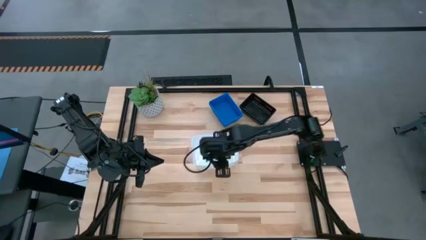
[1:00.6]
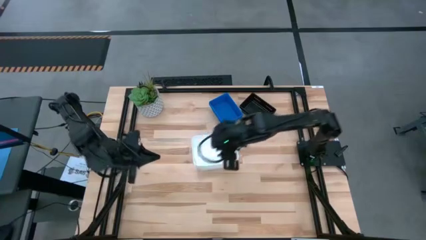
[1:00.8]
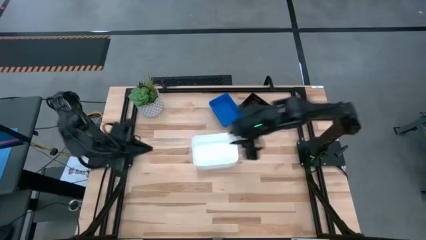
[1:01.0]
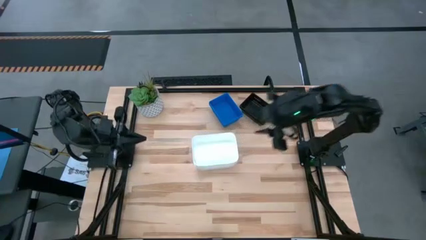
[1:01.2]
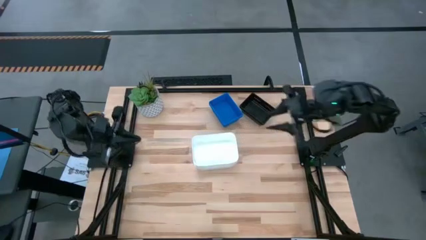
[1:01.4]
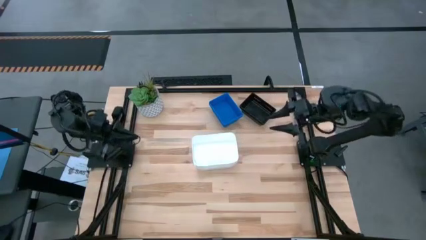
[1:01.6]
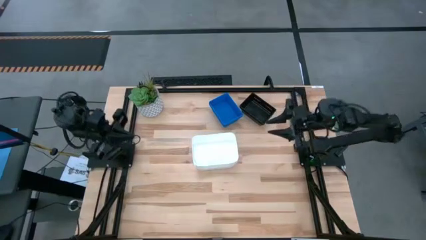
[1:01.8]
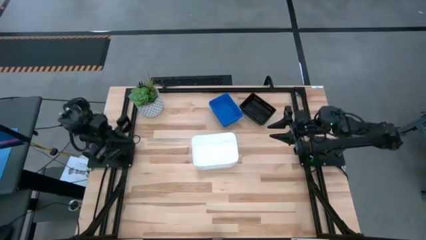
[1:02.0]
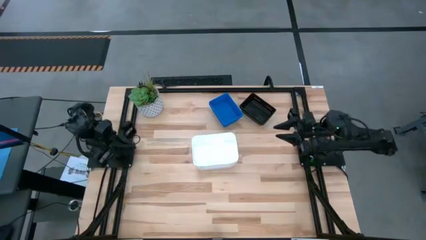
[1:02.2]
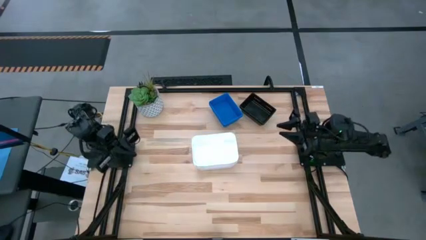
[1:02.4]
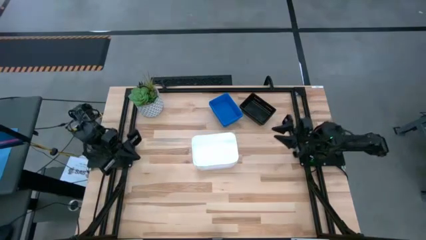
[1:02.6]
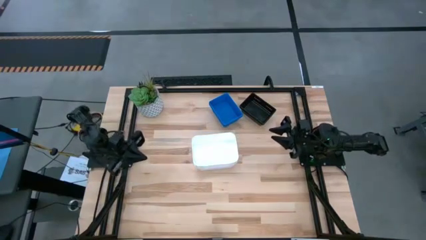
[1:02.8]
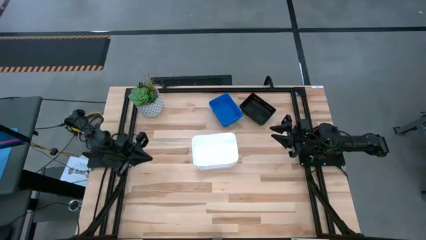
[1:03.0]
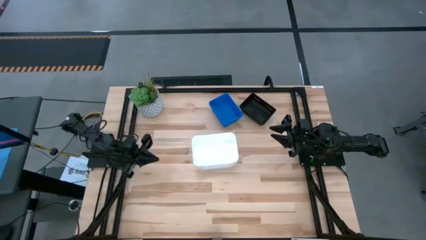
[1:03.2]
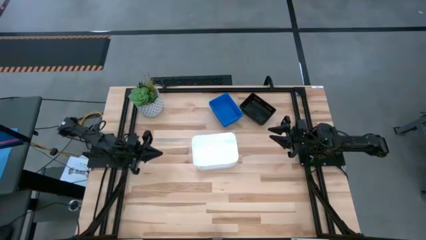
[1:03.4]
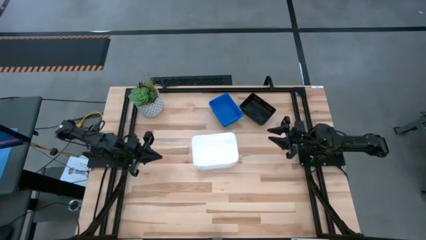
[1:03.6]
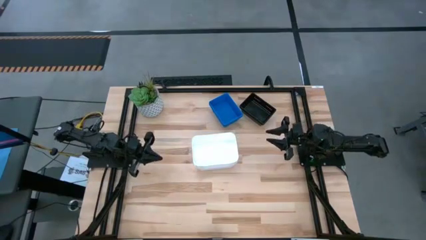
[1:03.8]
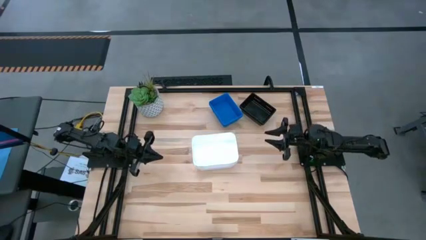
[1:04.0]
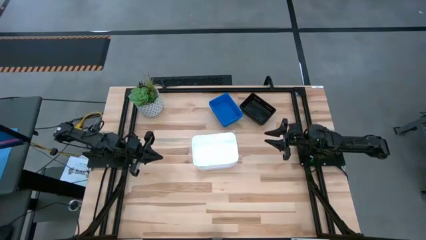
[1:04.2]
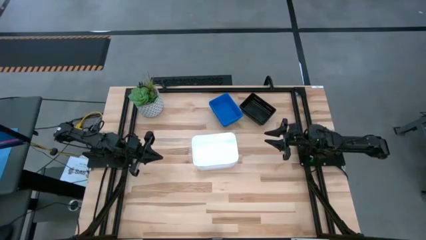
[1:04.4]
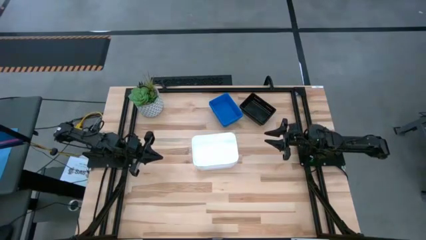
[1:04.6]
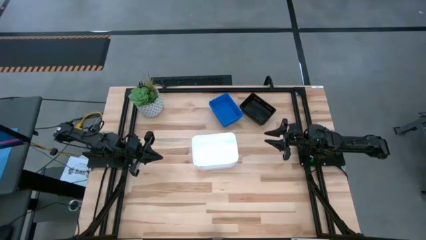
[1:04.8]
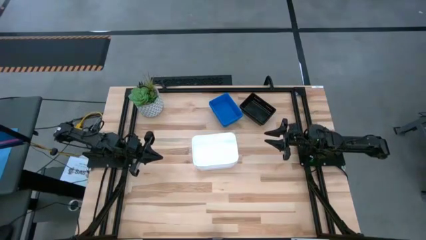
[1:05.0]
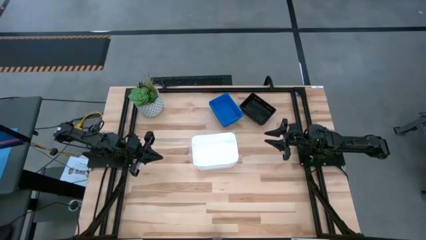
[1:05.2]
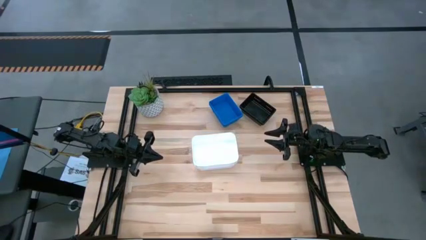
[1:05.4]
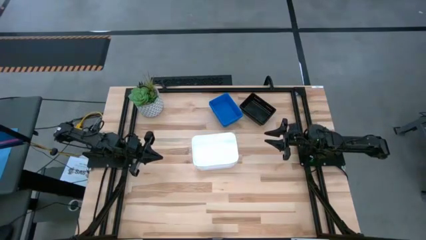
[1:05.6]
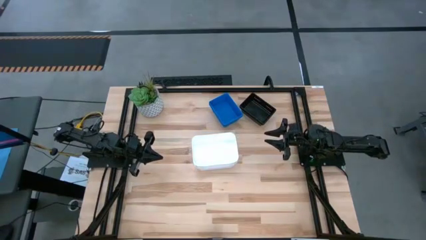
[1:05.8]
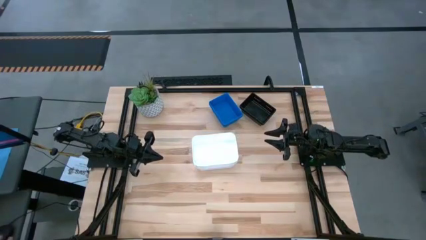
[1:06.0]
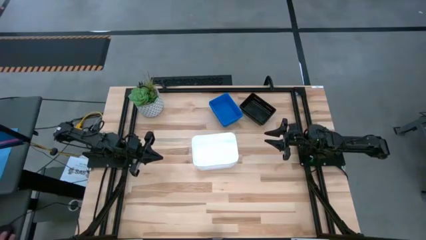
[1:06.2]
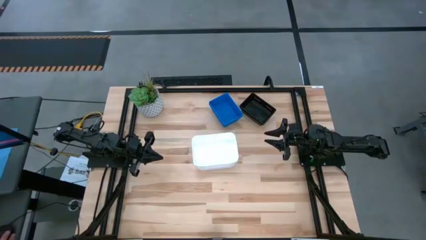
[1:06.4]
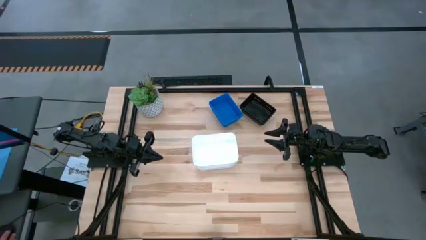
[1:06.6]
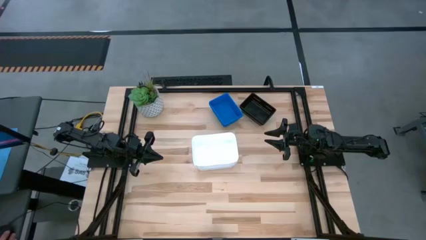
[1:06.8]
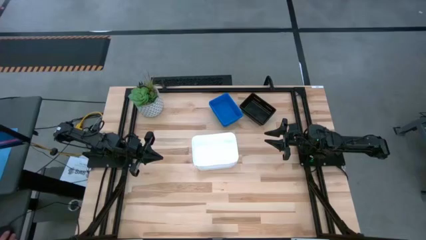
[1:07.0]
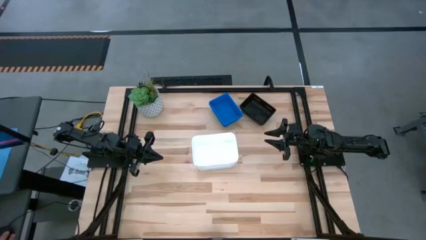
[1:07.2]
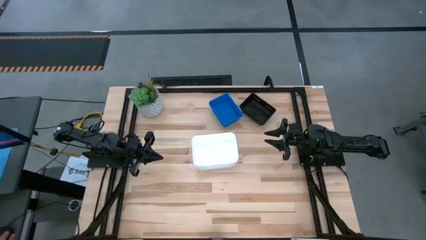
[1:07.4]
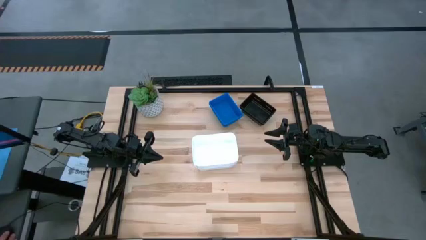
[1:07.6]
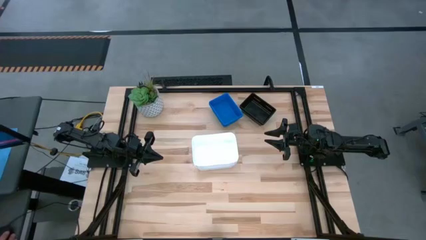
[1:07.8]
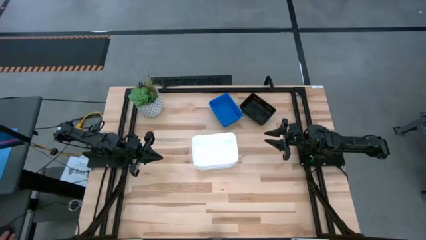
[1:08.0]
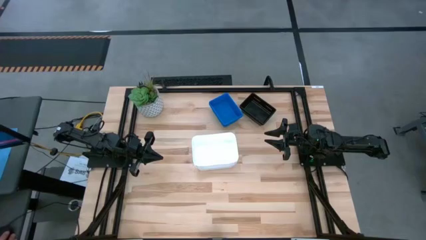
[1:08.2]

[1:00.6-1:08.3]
Return to Home Position

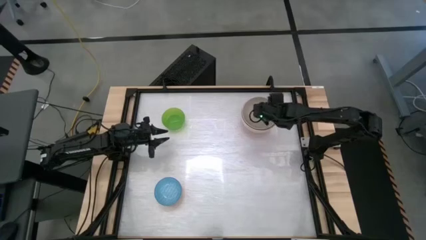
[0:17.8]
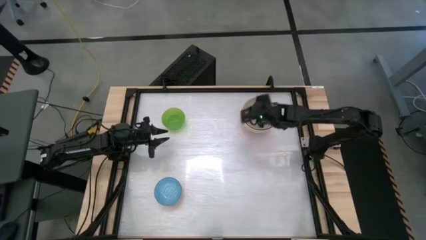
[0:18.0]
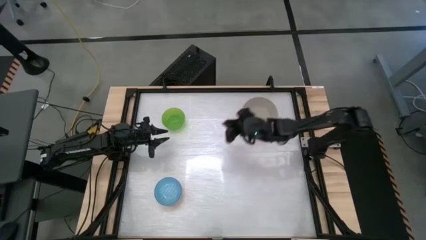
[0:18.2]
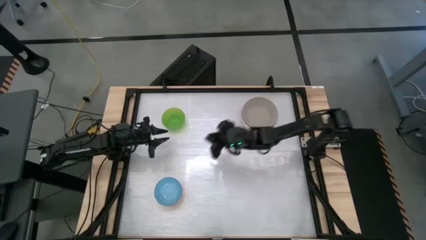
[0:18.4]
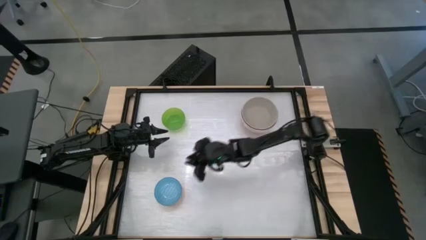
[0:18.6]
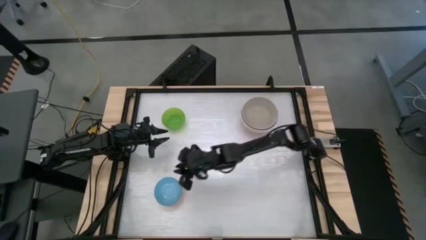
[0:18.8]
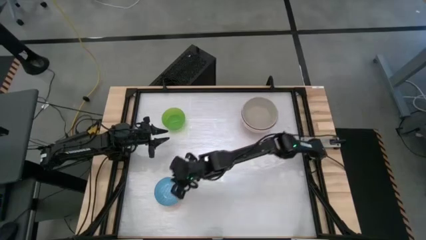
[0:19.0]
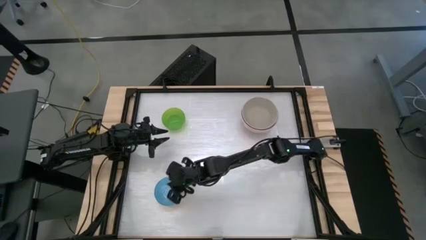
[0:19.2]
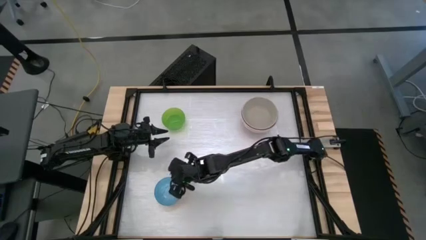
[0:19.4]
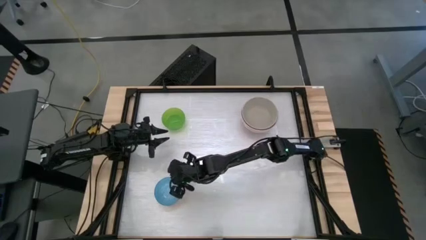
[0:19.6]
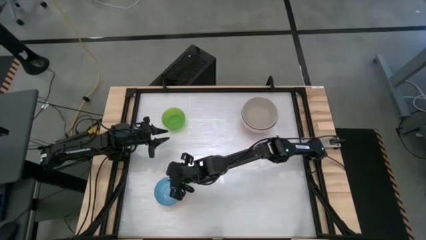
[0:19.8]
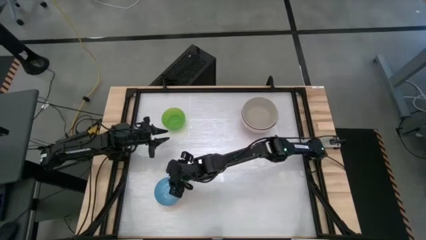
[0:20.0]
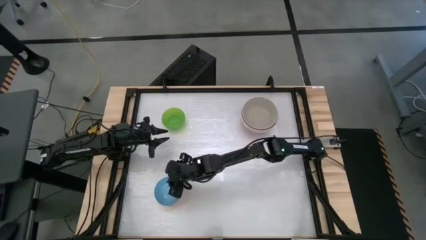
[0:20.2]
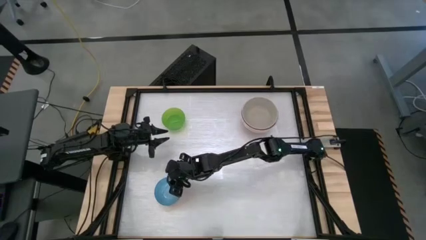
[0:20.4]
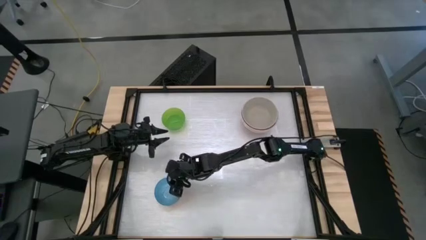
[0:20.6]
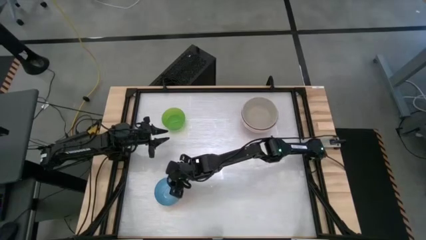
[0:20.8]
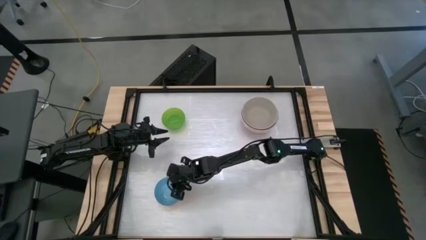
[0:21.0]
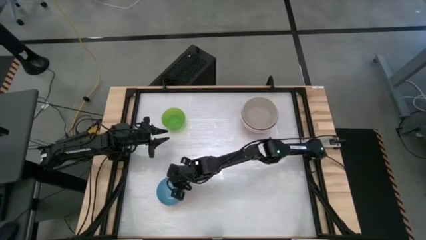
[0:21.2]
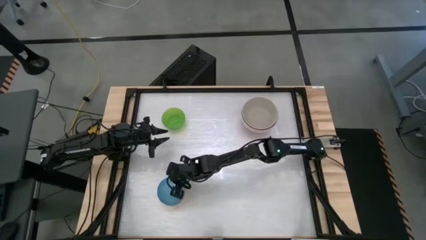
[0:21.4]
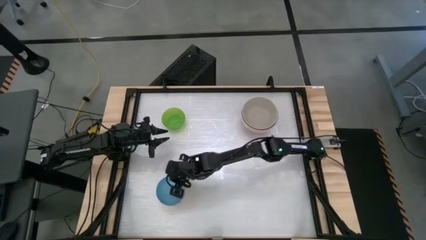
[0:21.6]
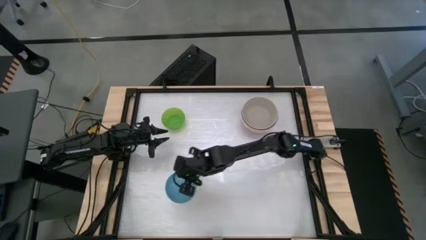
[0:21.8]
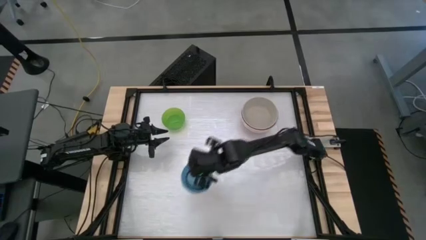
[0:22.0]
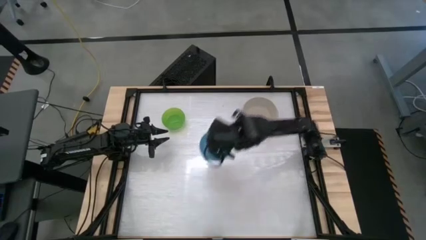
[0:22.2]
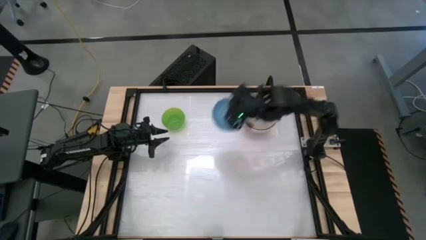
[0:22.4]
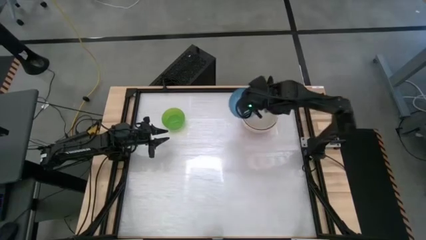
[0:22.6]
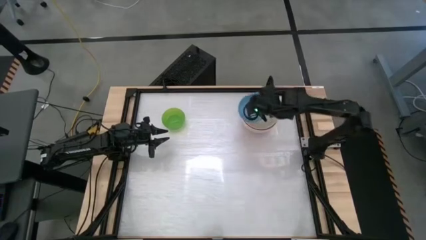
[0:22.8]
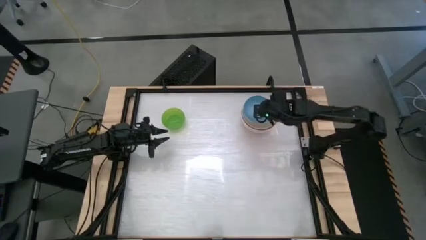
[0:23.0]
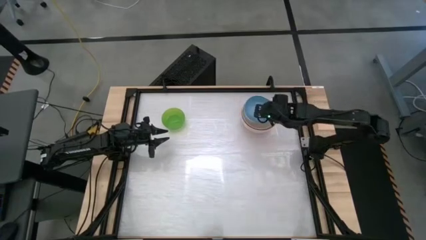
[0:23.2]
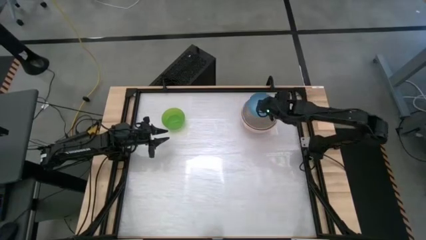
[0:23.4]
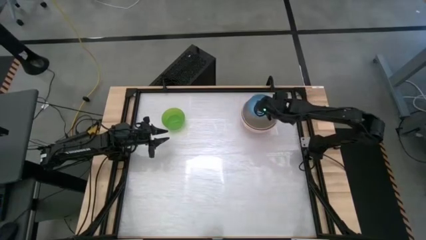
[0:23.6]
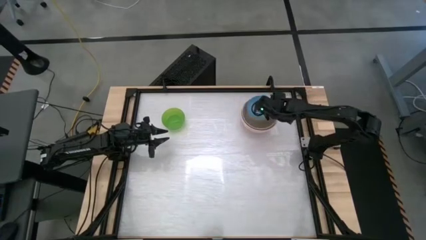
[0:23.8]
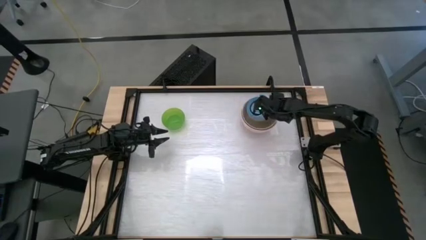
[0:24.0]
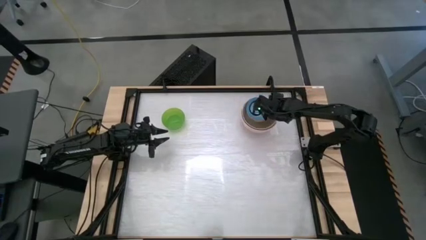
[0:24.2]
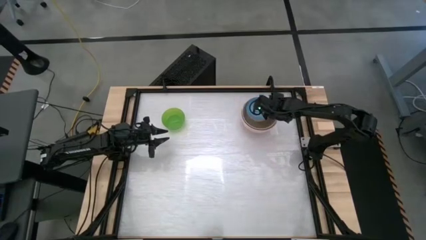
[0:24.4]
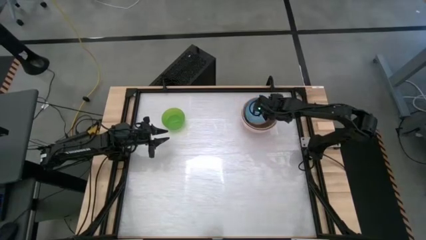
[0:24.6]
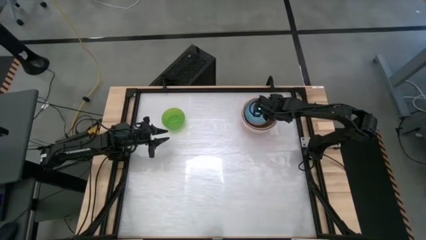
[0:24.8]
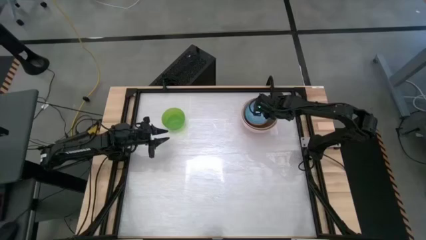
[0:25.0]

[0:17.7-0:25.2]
Stack the blue bowl on top of the gray bowl

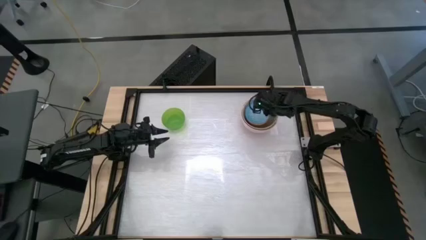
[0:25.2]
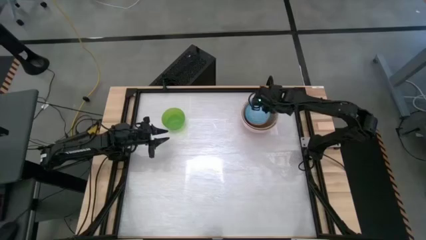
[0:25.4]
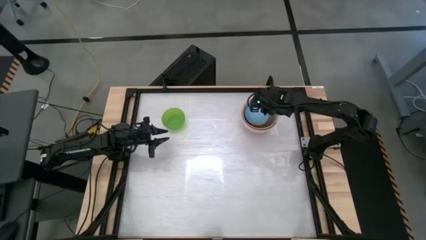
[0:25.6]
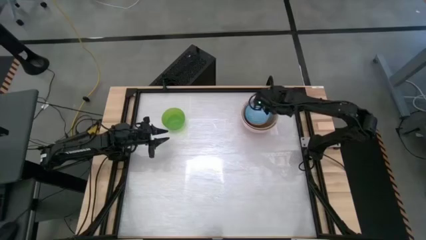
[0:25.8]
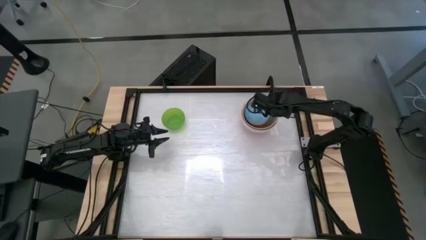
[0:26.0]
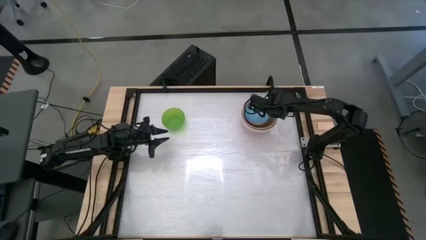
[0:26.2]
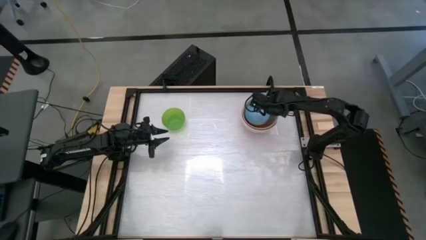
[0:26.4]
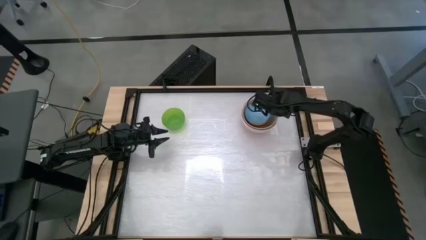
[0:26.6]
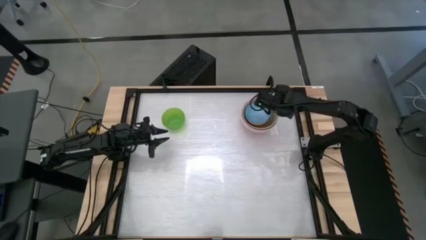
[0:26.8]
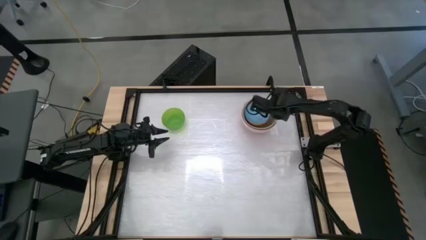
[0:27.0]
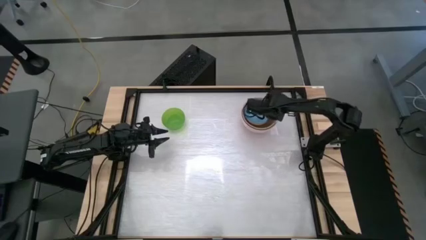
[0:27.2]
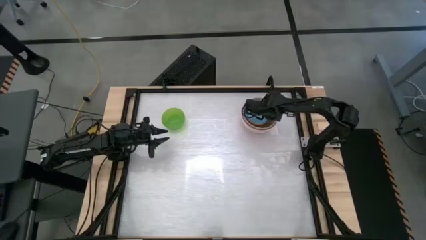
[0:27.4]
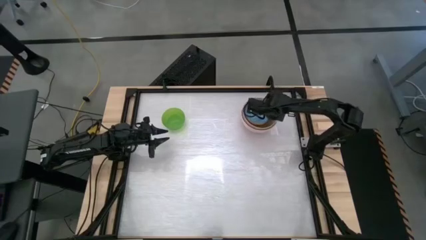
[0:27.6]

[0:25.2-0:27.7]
Adjust the stacked bowls
